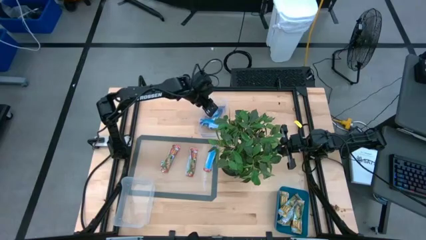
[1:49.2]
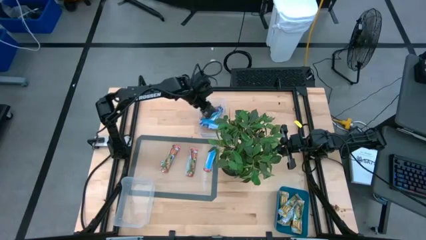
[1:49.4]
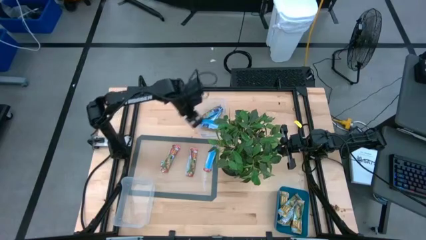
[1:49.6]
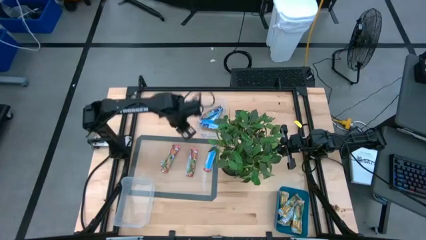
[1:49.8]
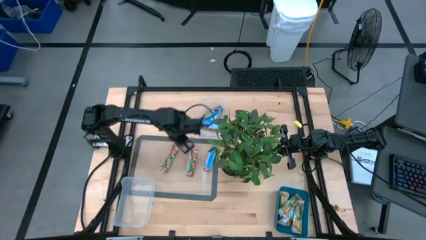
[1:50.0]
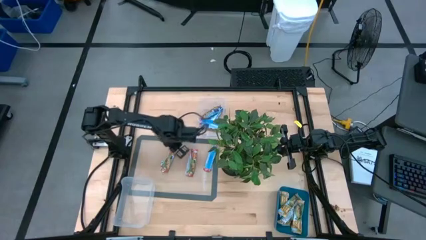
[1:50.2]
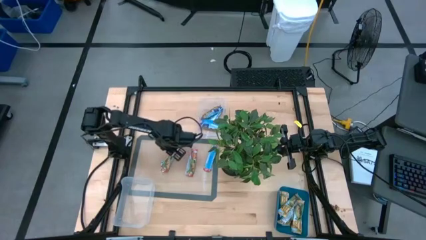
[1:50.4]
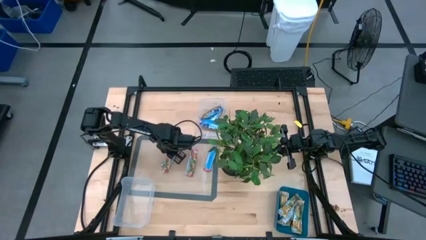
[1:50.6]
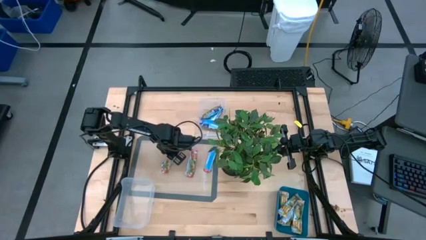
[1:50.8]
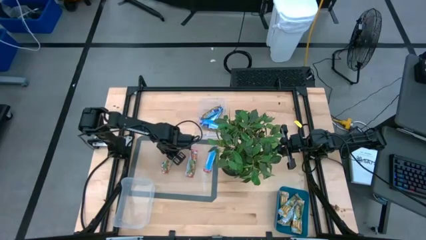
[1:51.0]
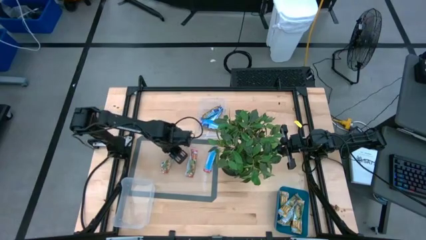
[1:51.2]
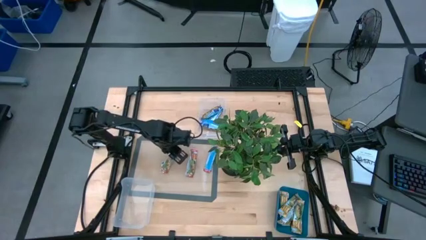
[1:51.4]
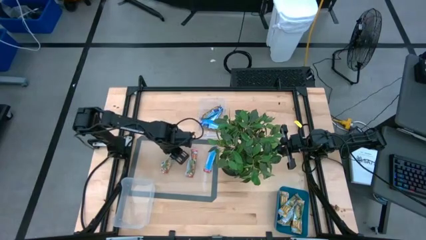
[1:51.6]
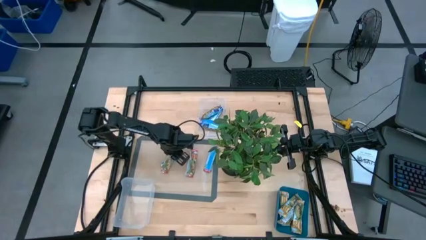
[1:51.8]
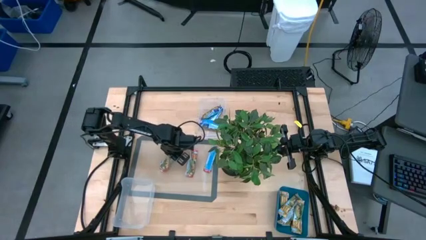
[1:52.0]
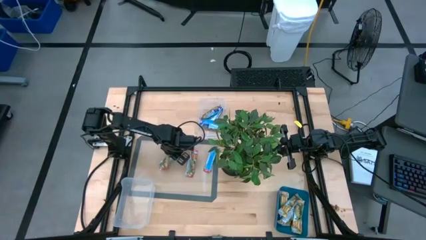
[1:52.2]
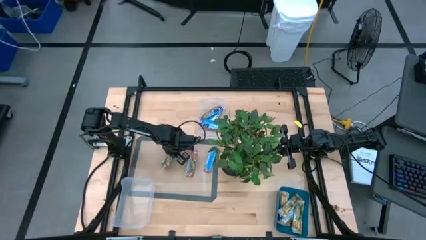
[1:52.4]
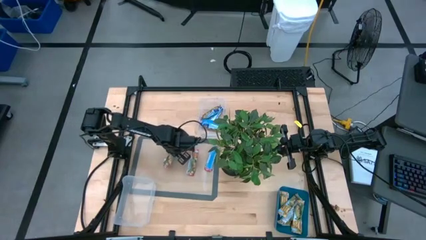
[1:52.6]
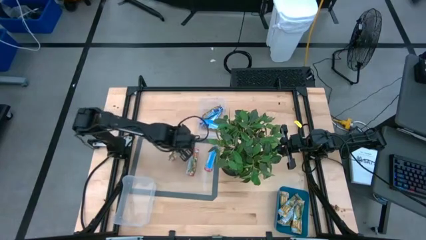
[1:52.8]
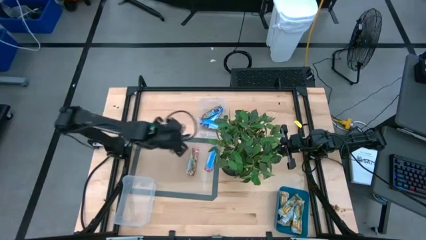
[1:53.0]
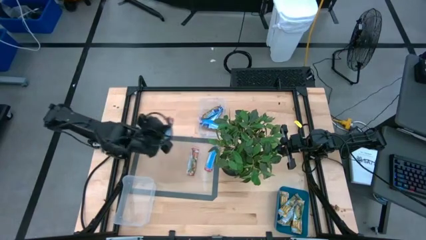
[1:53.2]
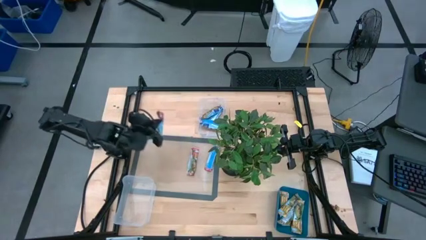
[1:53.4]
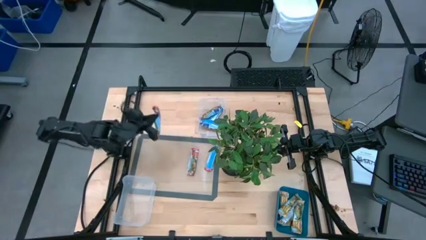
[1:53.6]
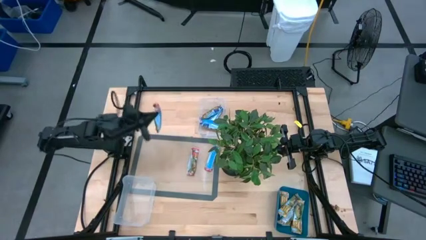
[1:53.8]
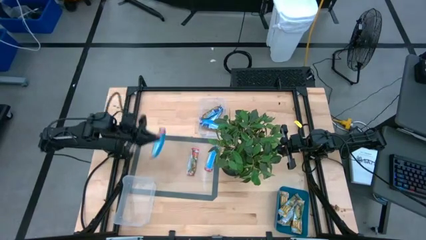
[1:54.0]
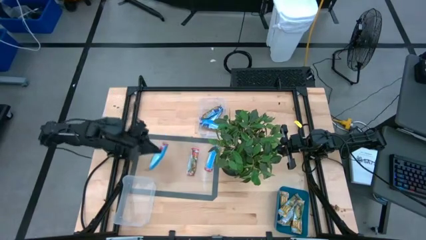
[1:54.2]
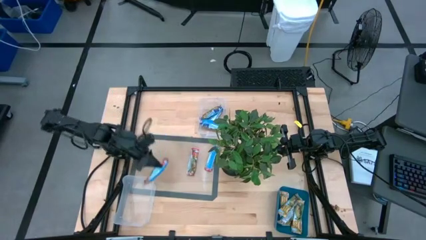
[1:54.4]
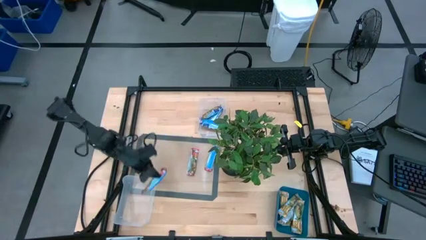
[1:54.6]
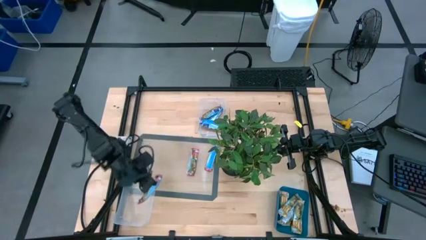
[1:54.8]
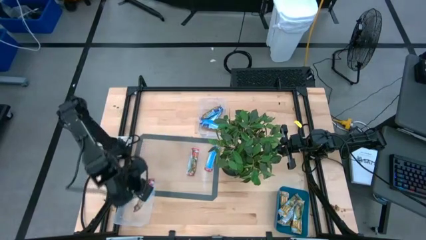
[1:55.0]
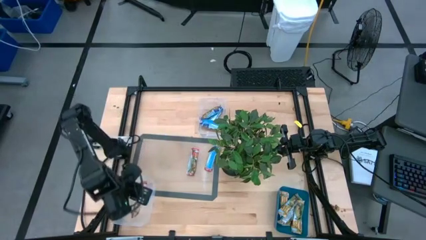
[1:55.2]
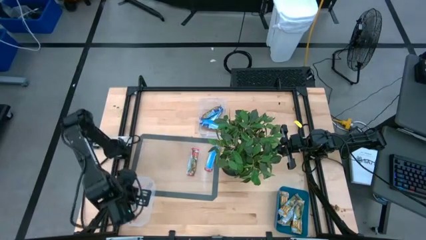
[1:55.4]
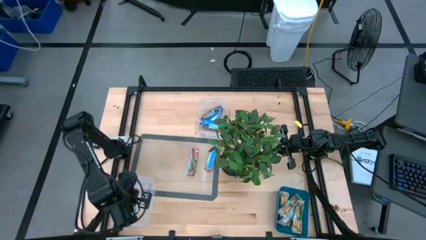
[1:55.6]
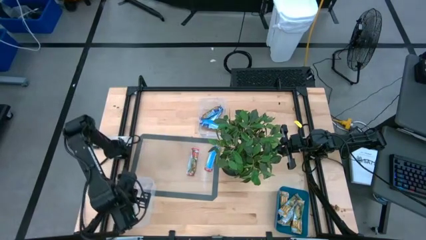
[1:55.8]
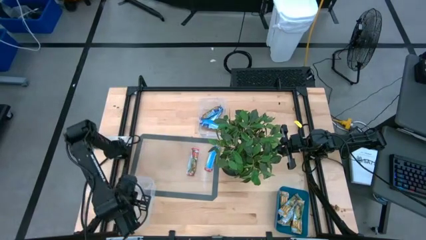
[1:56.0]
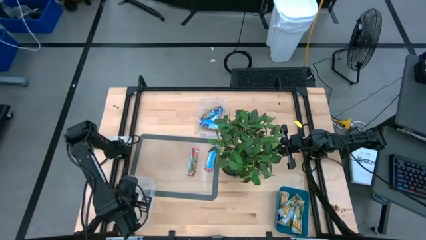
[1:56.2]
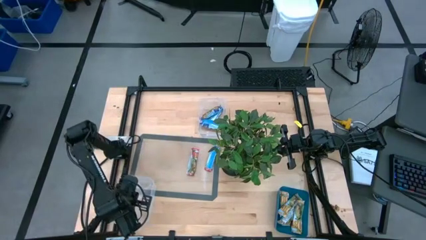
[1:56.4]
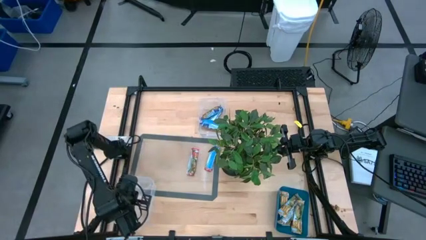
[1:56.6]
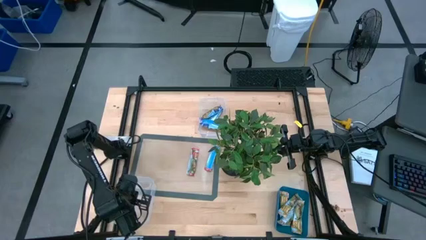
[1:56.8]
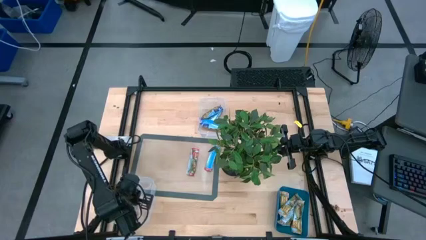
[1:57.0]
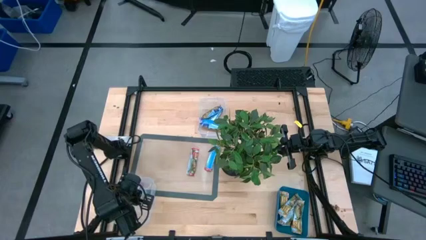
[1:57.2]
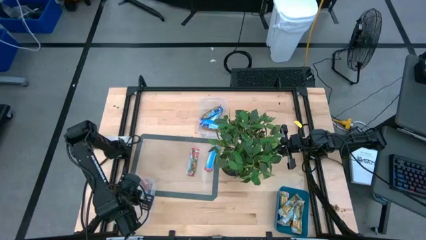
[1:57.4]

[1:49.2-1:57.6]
Task: Pick and place Granola Bars by type
Put the left red granola bar into the bottom transparent bin

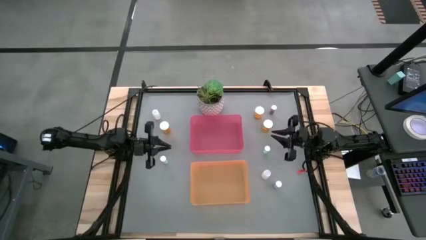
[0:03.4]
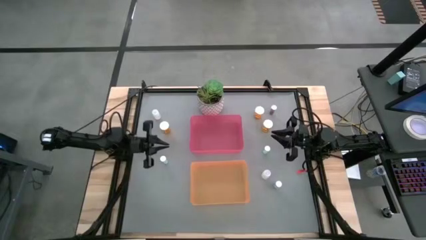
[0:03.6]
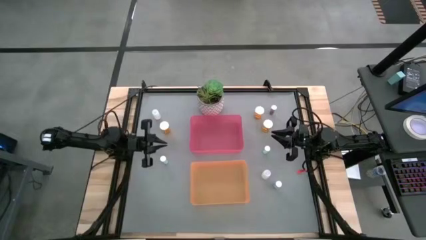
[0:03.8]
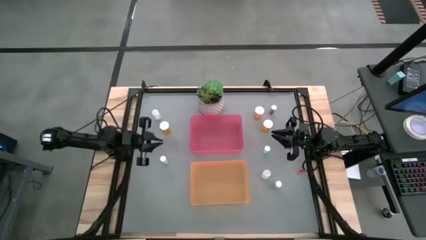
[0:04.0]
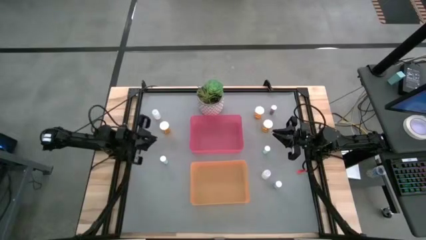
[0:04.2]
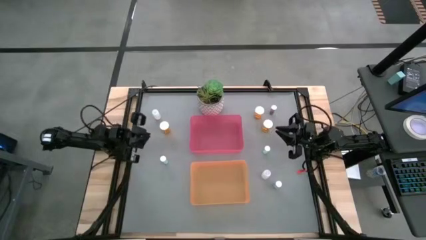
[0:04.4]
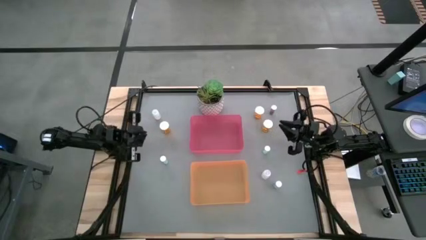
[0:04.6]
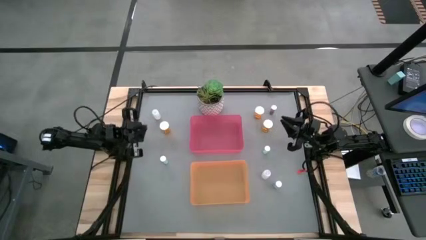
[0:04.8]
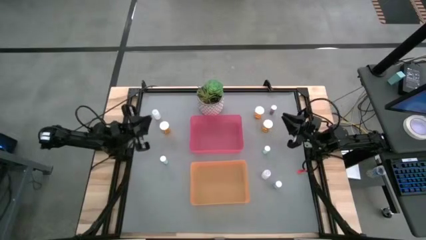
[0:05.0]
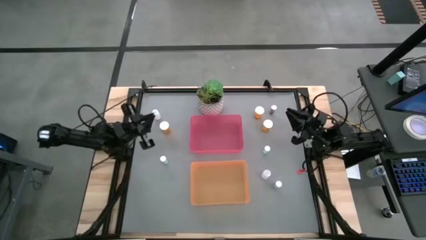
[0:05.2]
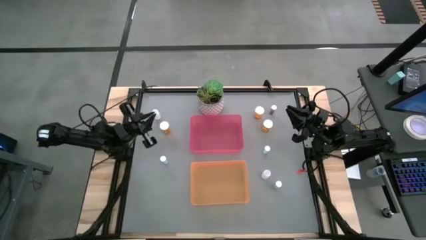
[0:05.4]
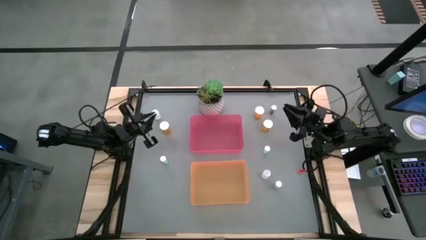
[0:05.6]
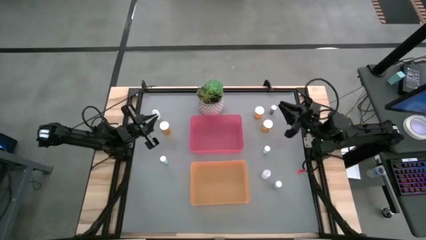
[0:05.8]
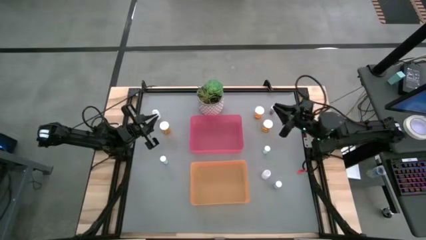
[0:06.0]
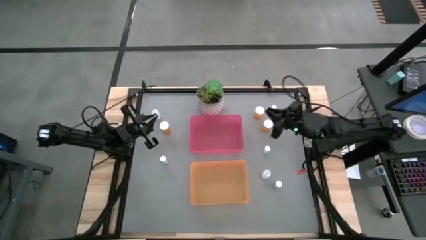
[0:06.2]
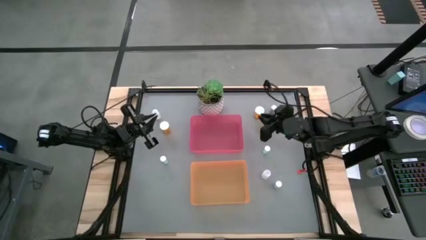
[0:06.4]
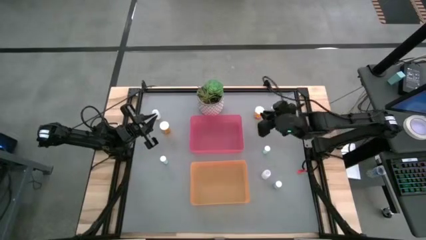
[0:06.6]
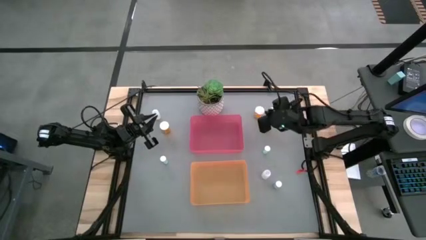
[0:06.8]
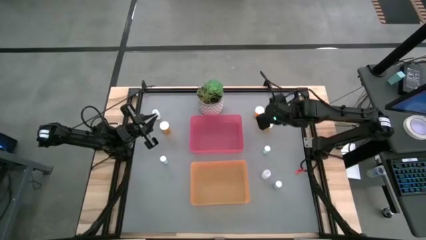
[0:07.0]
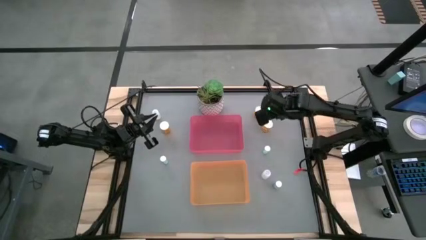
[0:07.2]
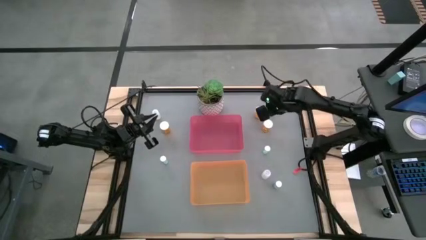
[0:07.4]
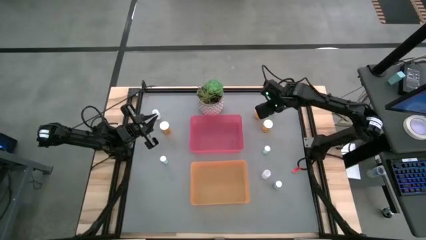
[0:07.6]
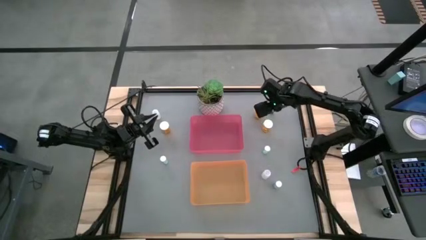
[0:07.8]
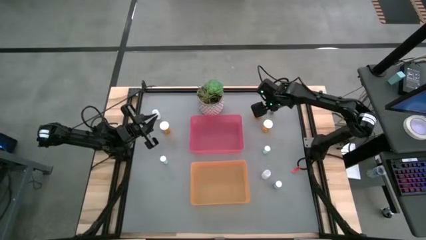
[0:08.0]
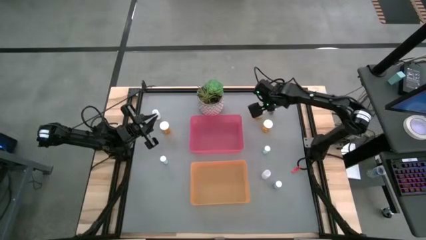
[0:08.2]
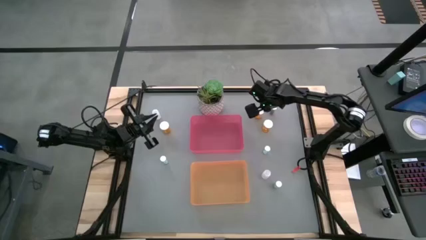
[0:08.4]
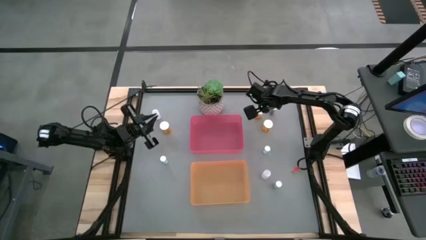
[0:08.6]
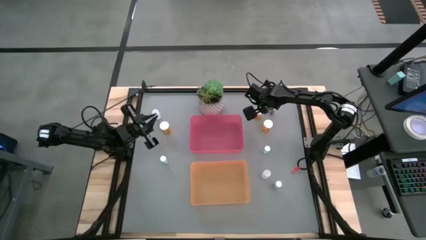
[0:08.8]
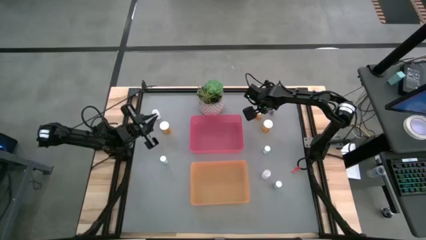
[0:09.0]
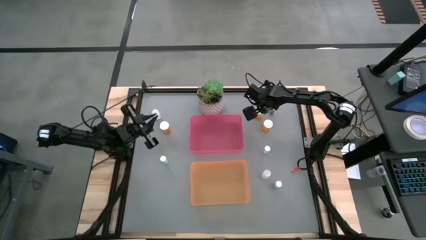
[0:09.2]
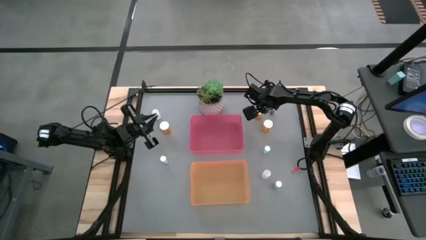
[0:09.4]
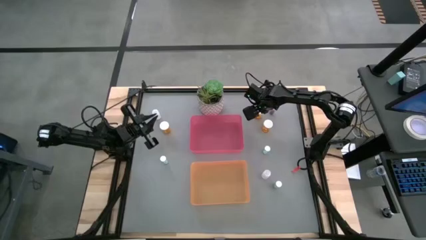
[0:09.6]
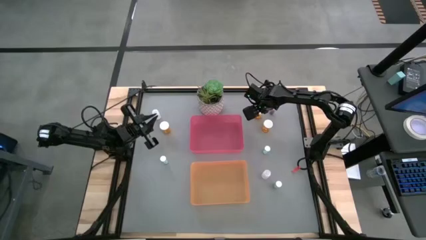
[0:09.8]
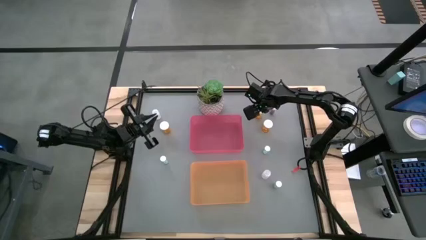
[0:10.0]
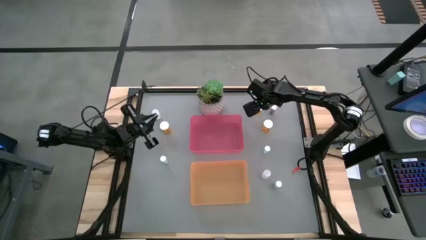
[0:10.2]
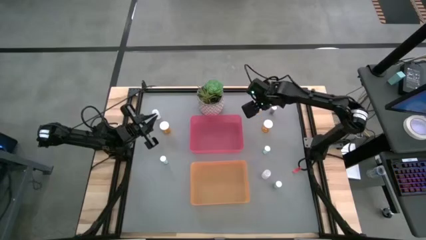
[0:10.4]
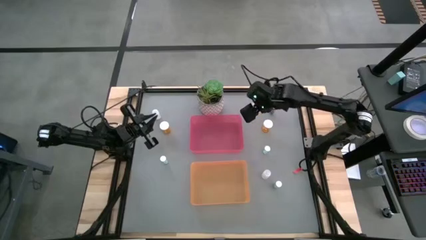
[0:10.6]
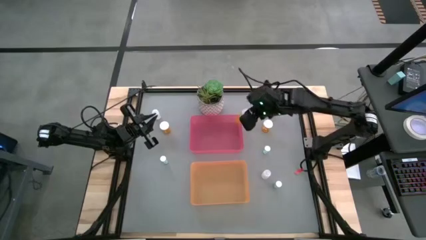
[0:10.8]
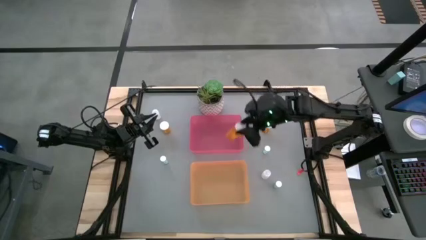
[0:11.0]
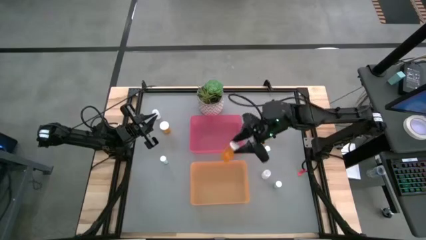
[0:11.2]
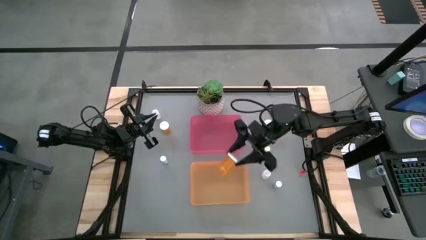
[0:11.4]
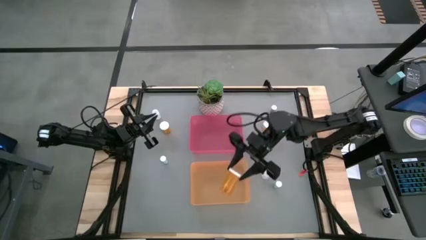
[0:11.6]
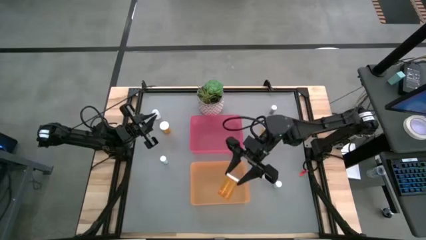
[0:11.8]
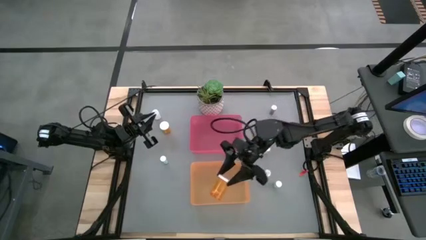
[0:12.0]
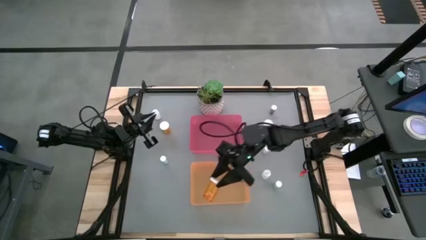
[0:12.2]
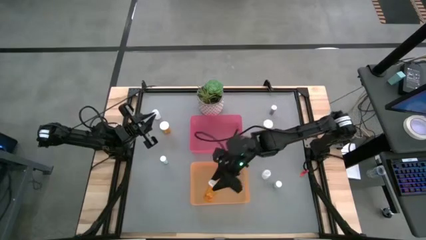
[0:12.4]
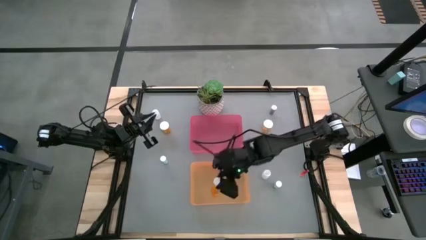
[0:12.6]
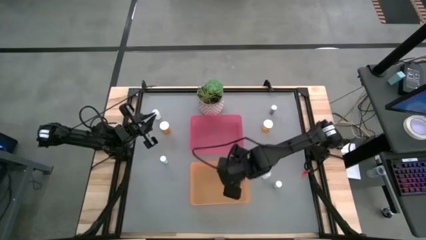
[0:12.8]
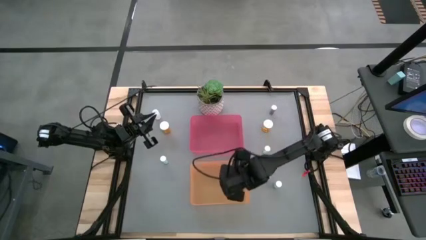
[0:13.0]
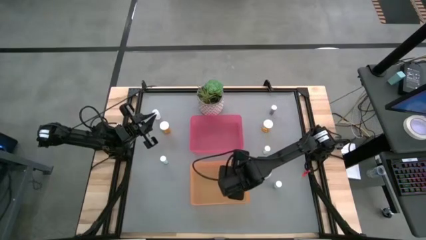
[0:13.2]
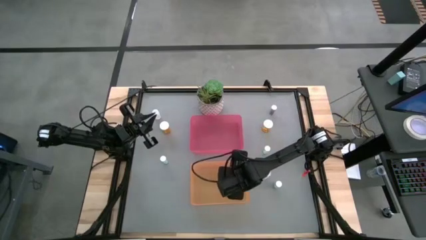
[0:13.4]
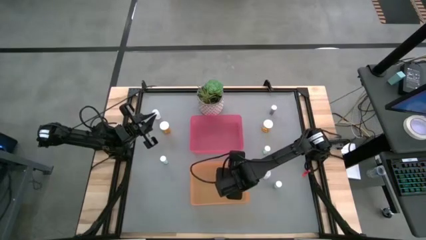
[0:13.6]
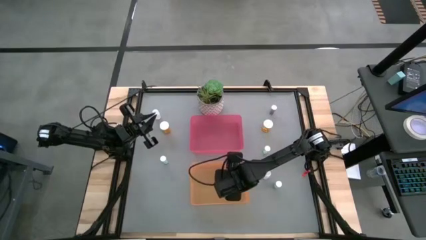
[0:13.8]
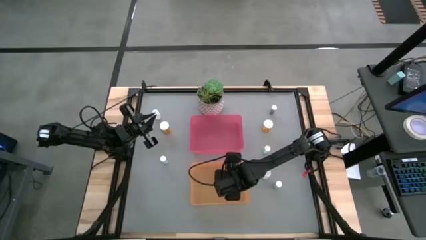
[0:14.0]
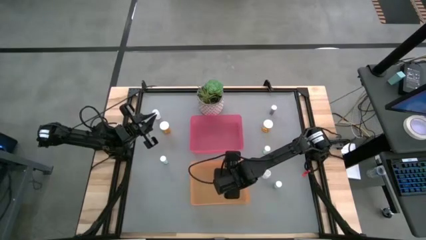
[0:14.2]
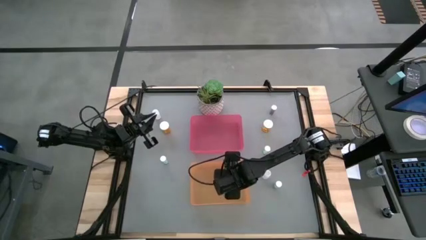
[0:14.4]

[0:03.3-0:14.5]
Task: Pick and place medicine bottles into bin by pill shape (circle, oval)
Put the top orange capsule bottle into the orange bin
